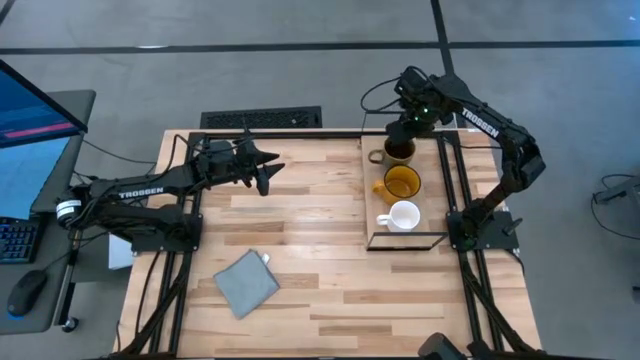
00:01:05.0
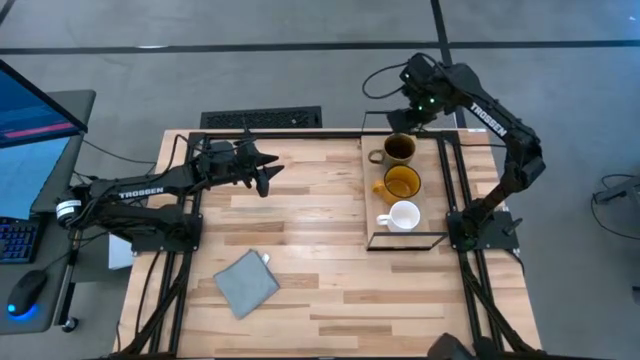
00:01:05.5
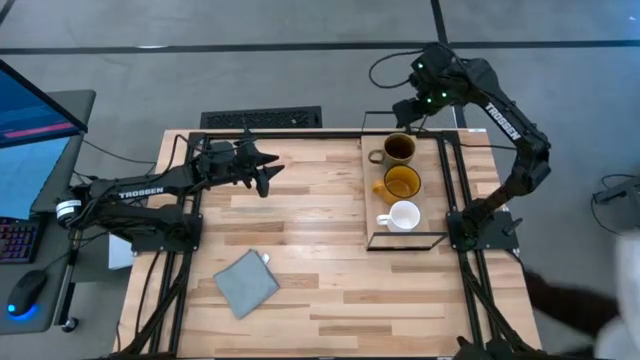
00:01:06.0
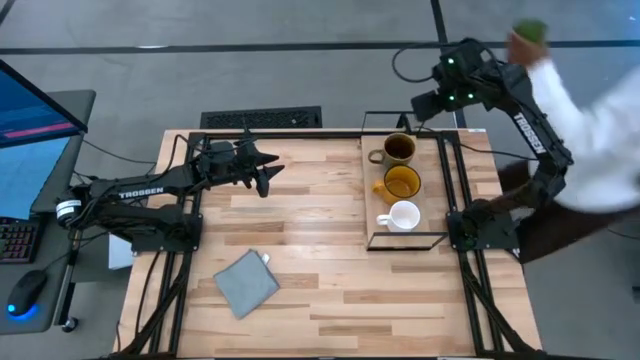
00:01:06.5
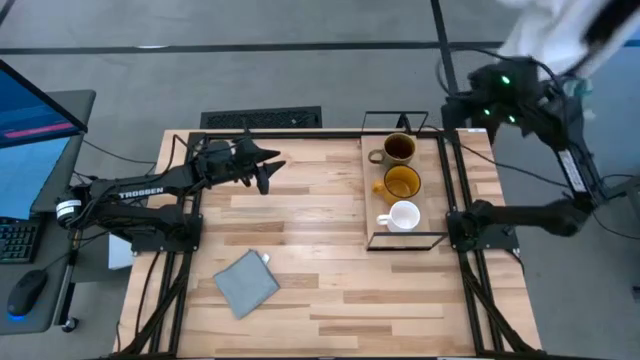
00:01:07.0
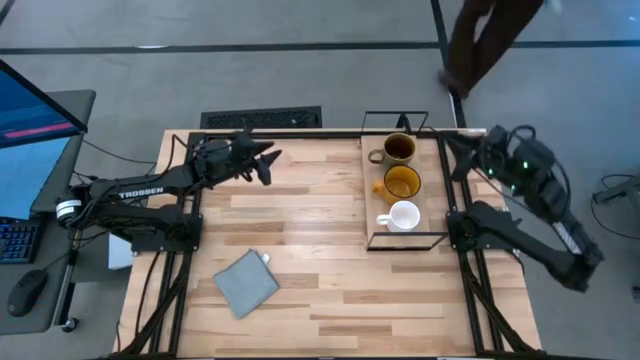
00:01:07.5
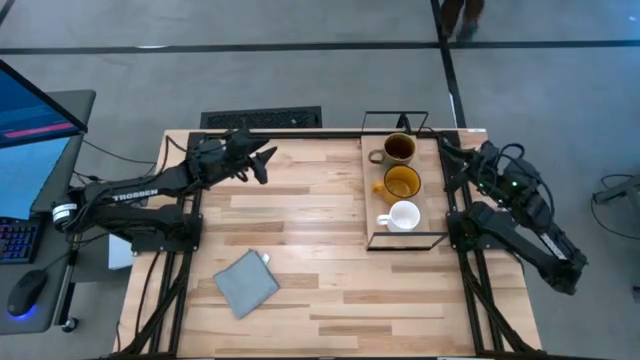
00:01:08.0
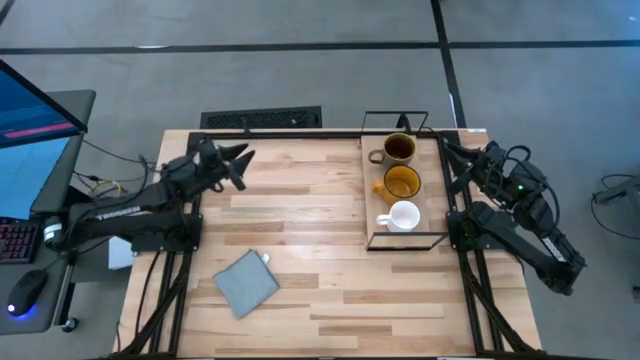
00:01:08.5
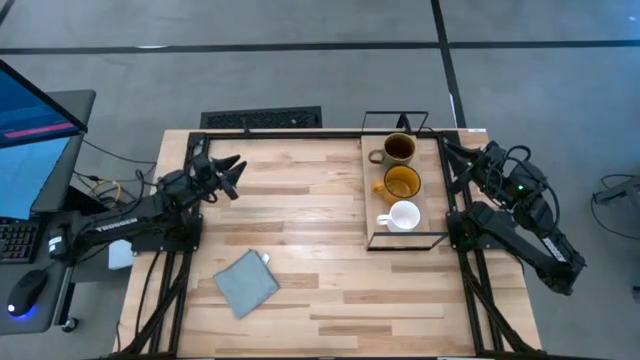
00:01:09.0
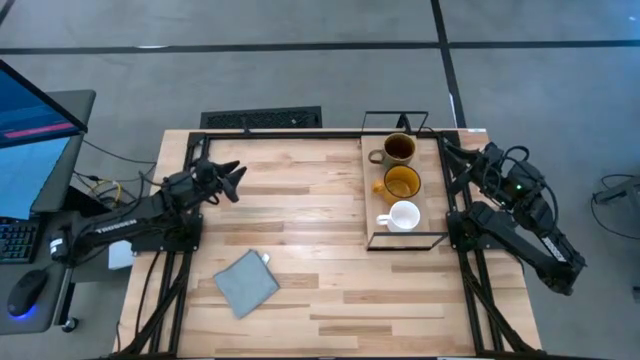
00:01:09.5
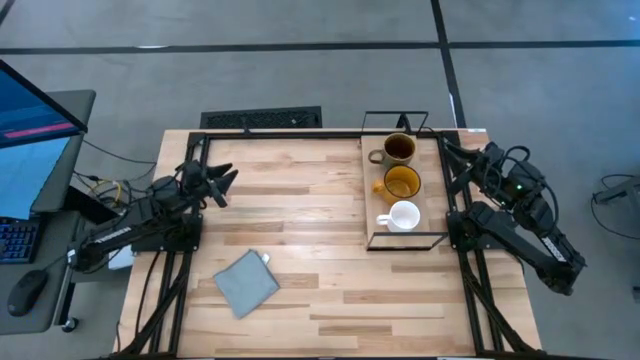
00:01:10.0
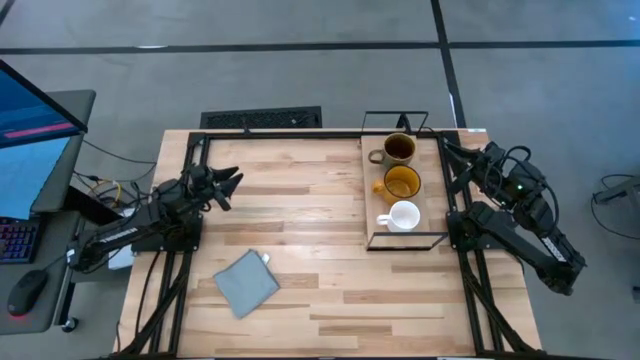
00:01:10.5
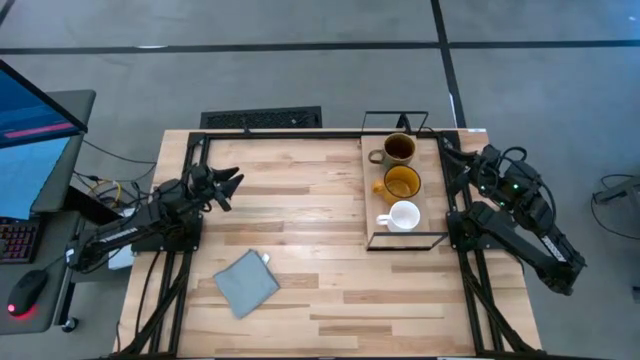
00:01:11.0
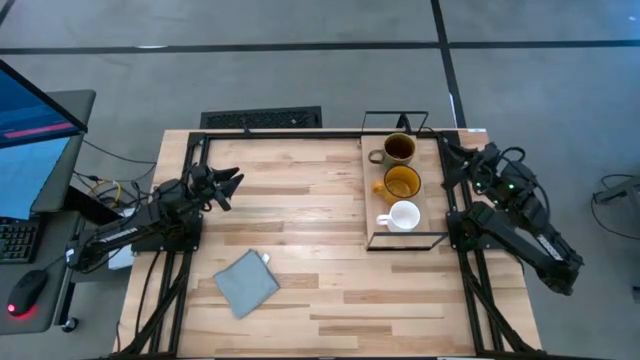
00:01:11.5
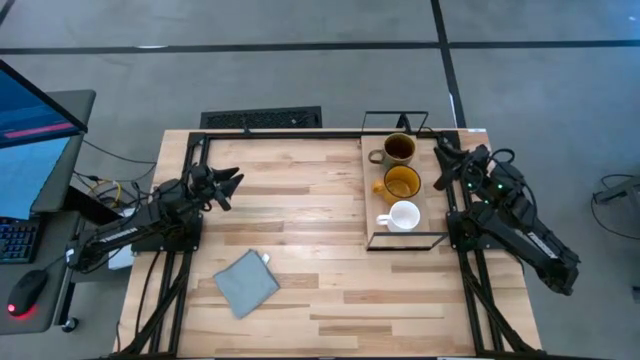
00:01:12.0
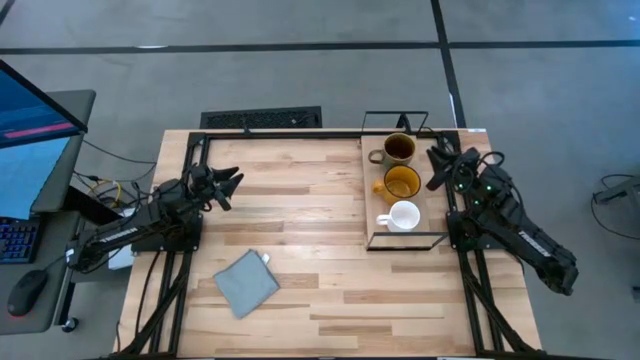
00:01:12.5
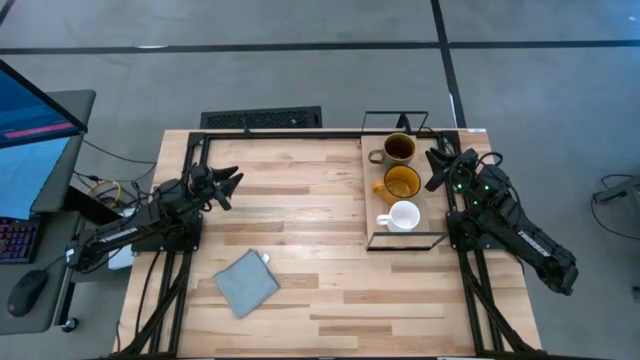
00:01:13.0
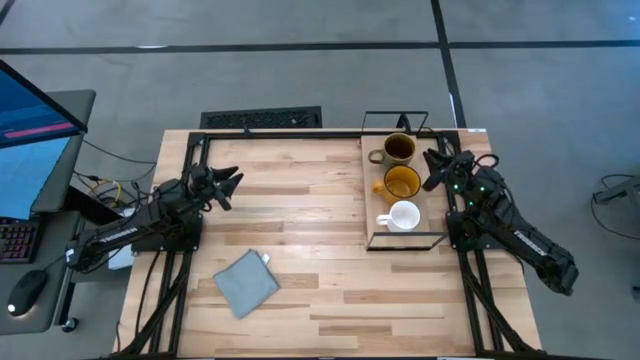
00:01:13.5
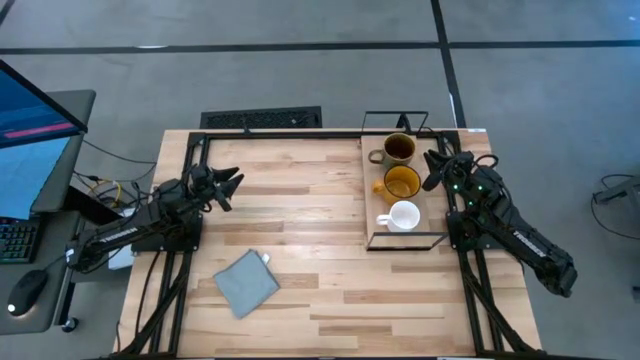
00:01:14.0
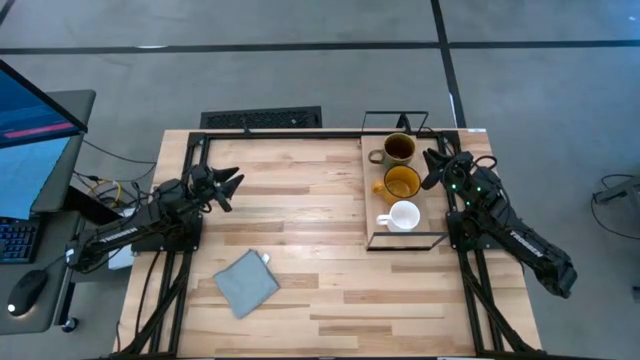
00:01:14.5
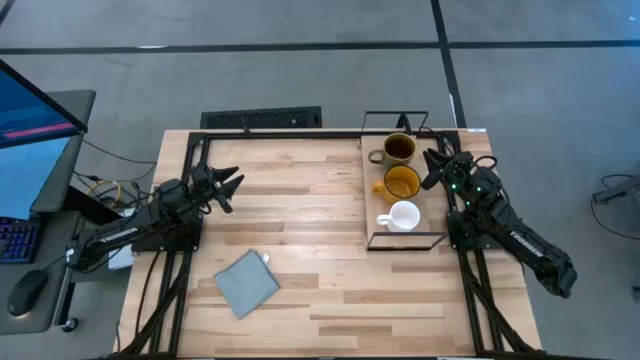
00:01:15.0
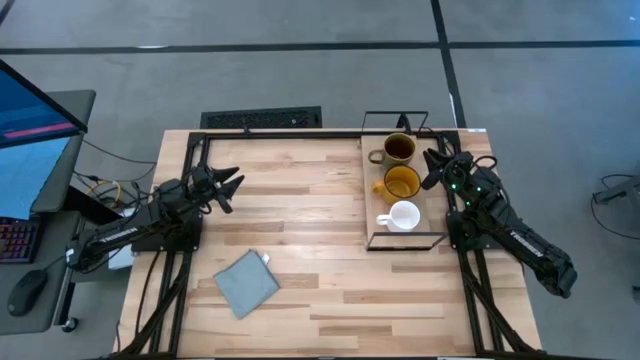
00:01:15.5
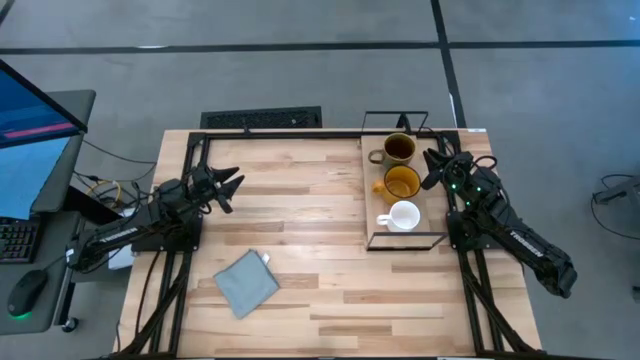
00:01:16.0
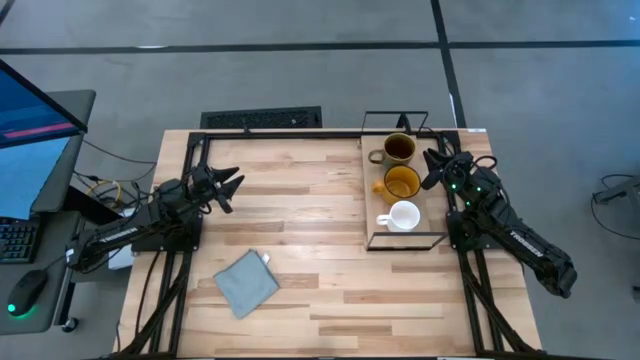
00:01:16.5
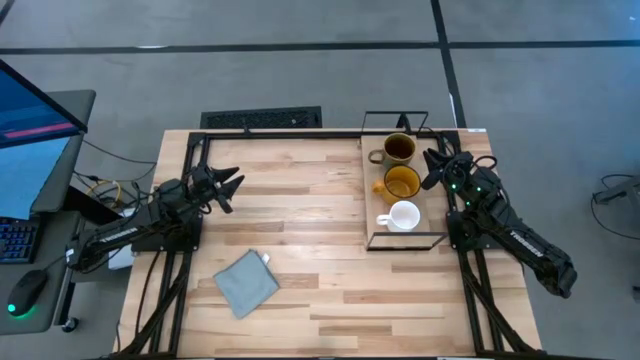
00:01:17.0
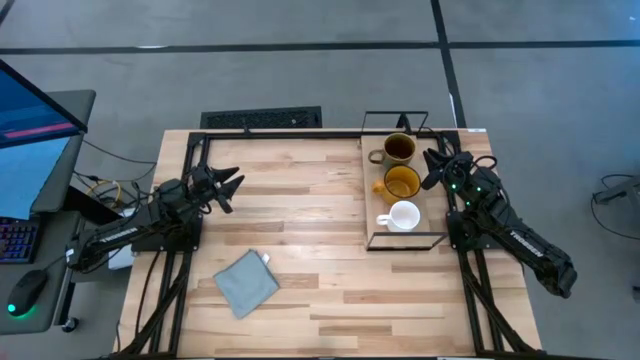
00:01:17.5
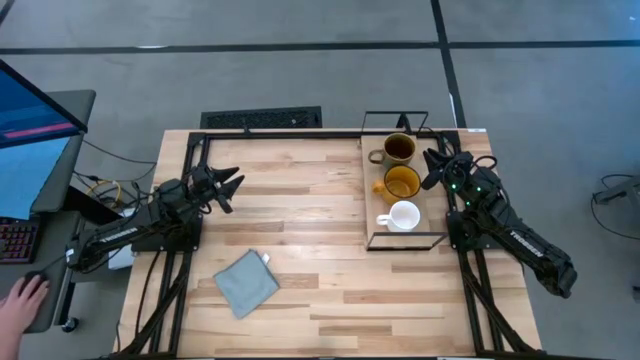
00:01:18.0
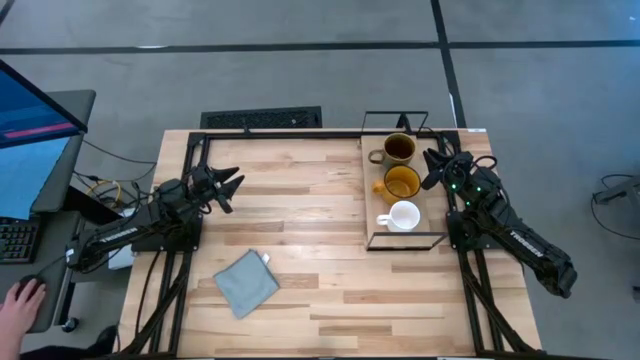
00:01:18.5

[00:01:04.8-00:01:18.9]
Task: Stack small to large cups/mugs on shelf
Return to Home Position
